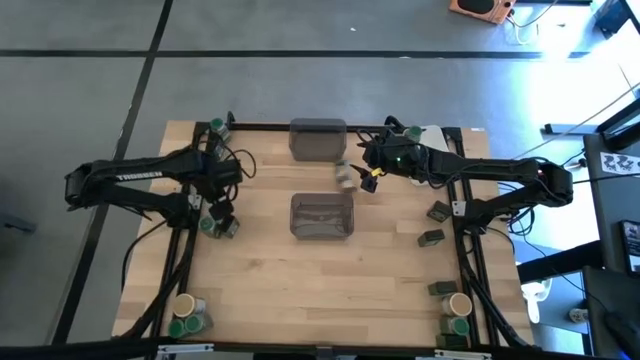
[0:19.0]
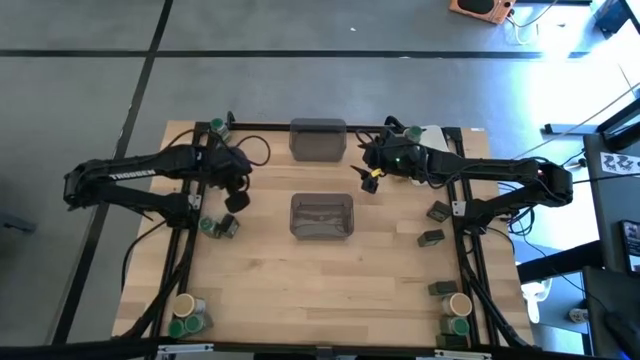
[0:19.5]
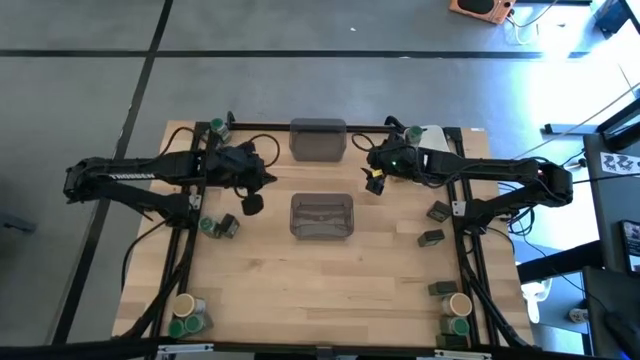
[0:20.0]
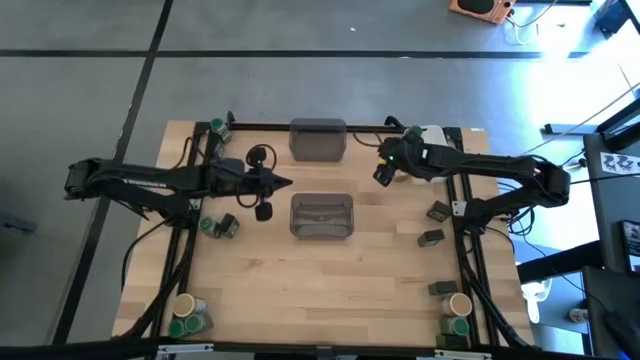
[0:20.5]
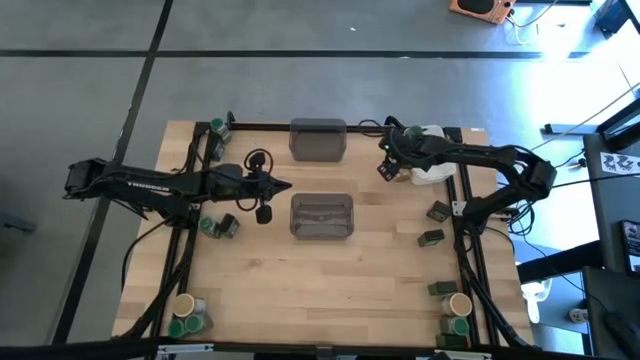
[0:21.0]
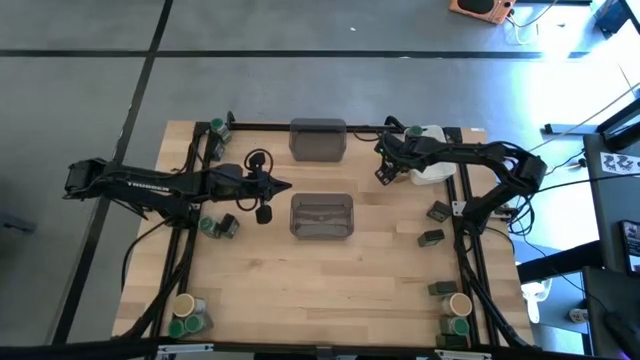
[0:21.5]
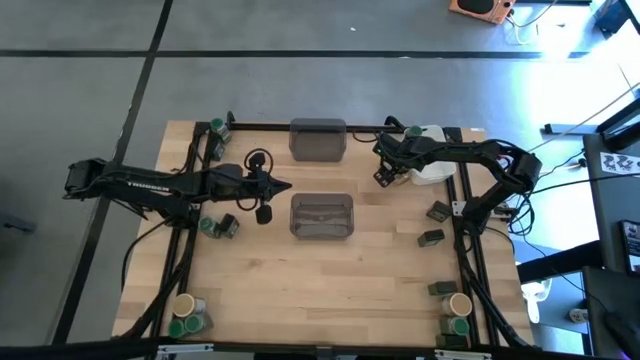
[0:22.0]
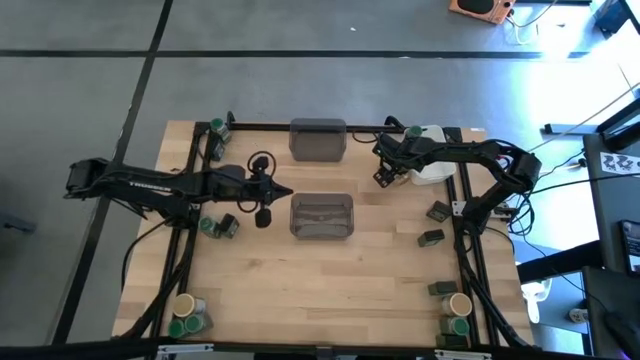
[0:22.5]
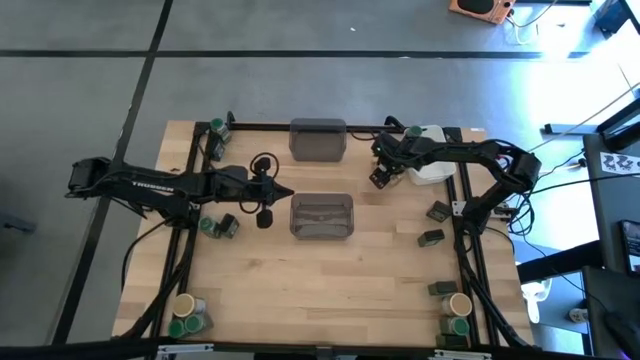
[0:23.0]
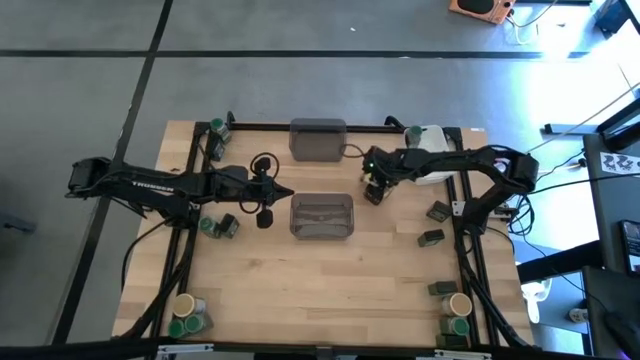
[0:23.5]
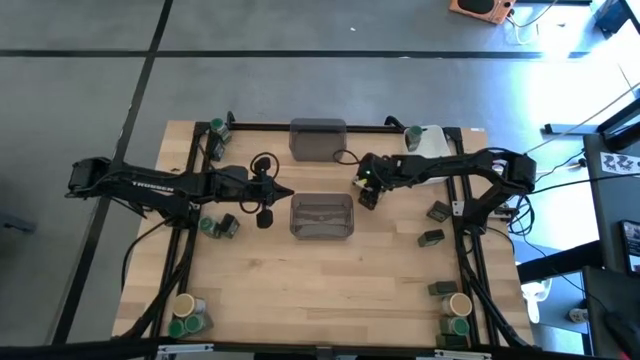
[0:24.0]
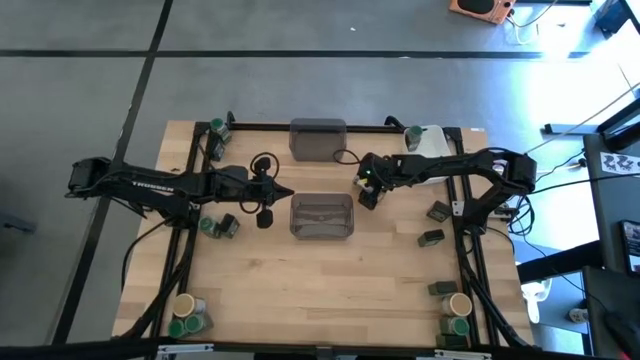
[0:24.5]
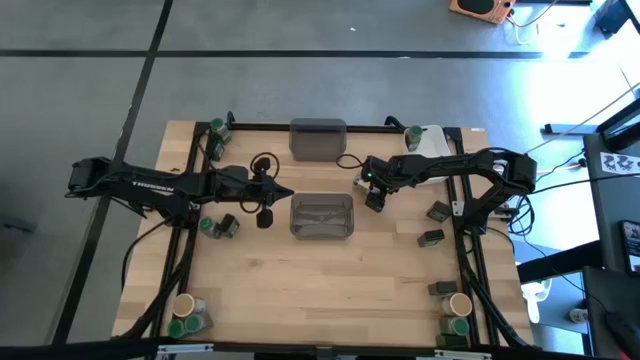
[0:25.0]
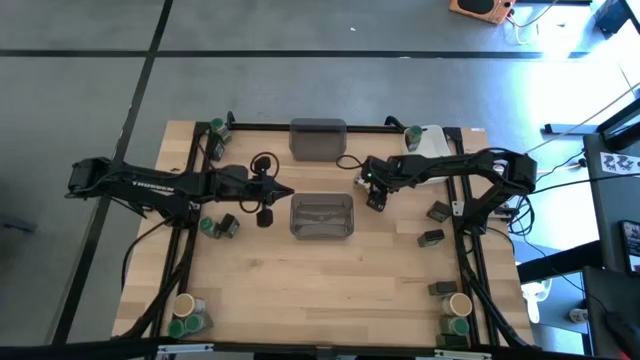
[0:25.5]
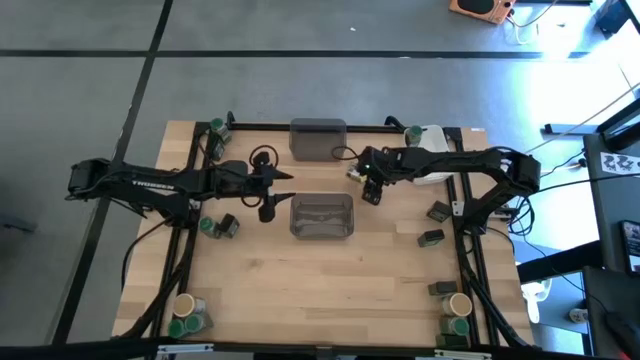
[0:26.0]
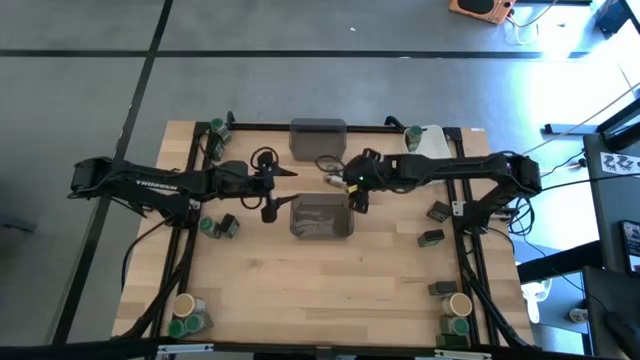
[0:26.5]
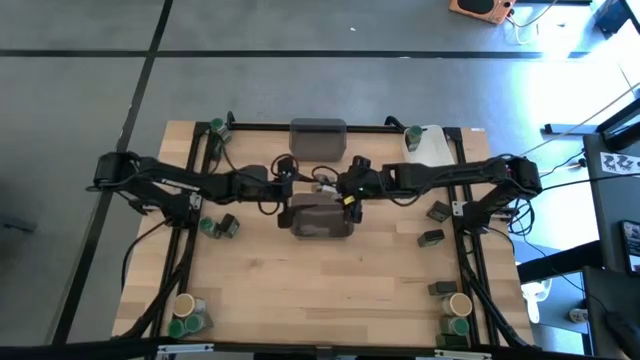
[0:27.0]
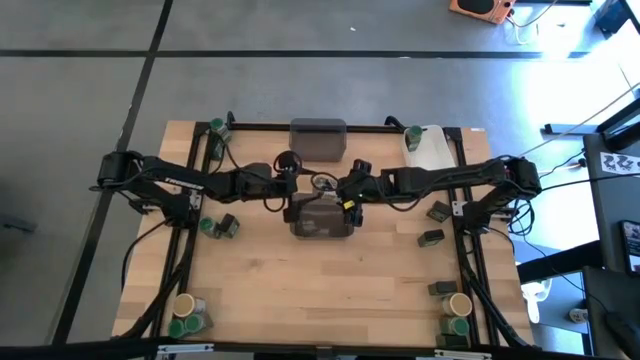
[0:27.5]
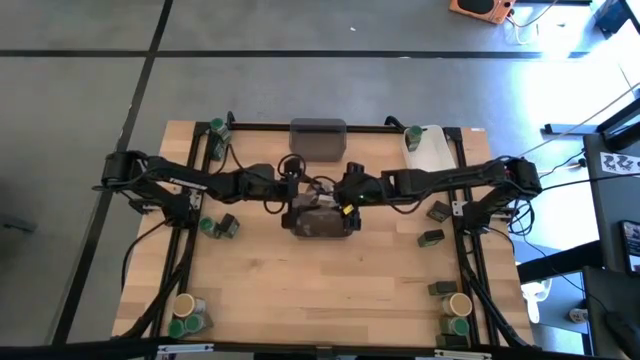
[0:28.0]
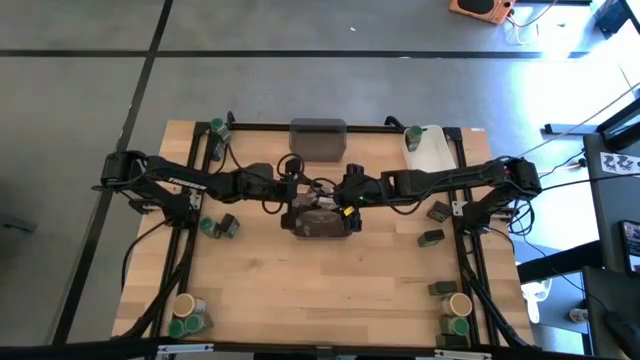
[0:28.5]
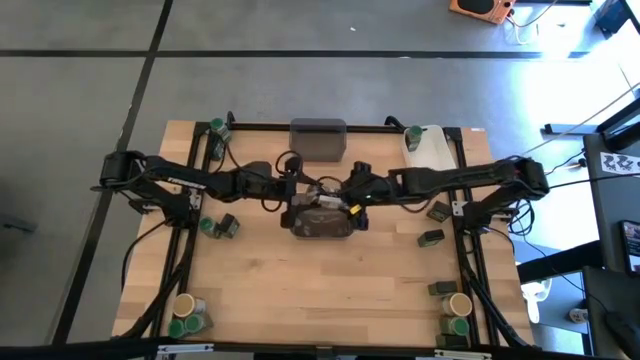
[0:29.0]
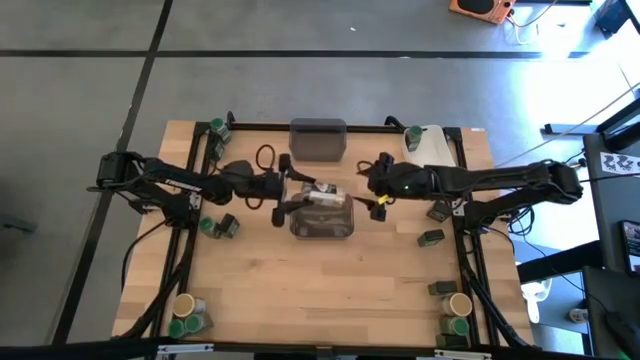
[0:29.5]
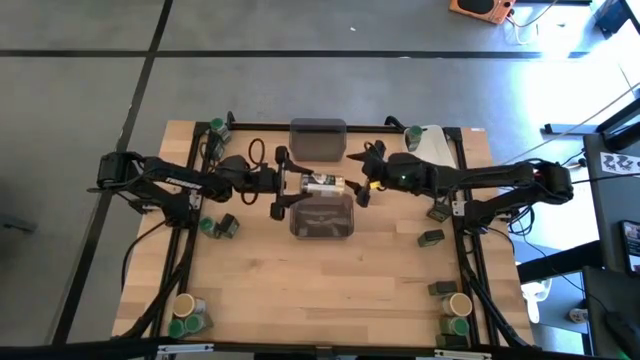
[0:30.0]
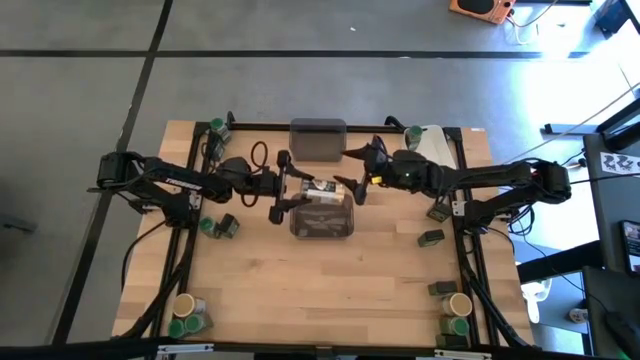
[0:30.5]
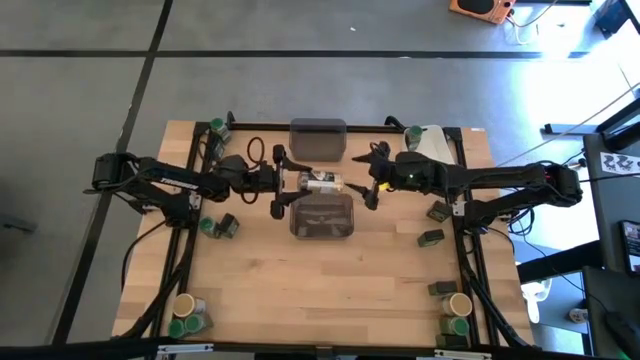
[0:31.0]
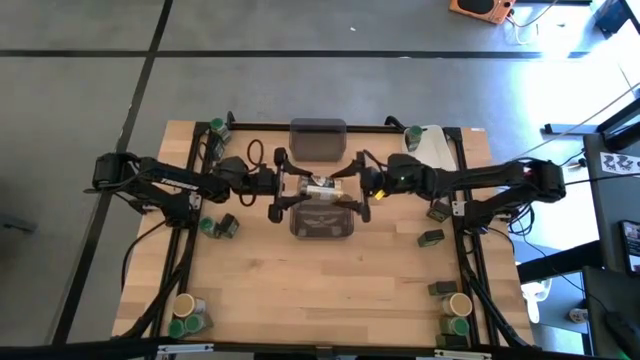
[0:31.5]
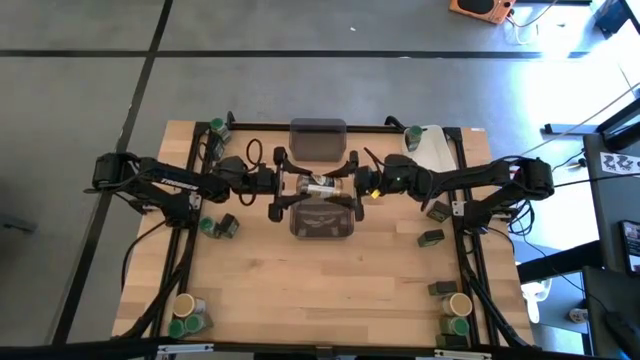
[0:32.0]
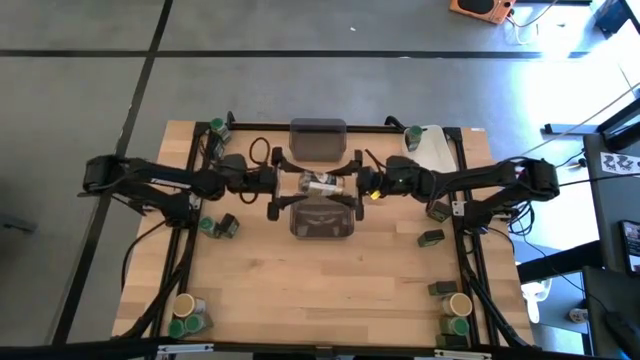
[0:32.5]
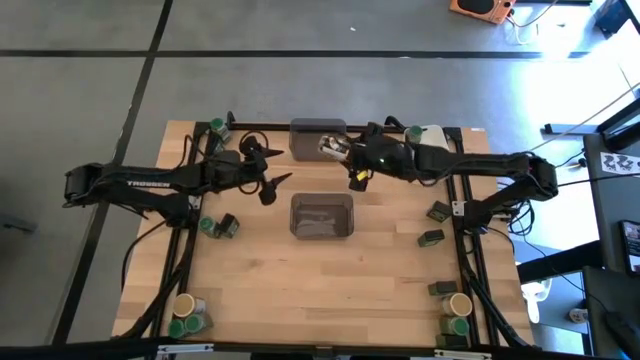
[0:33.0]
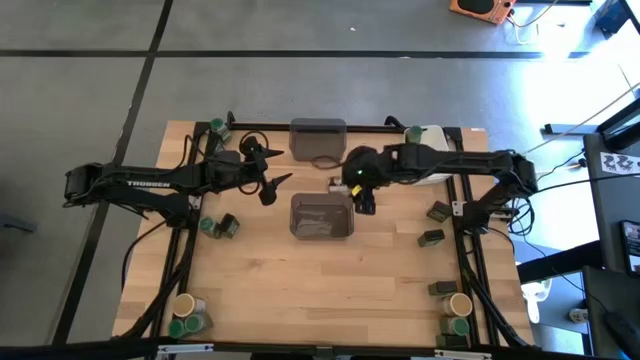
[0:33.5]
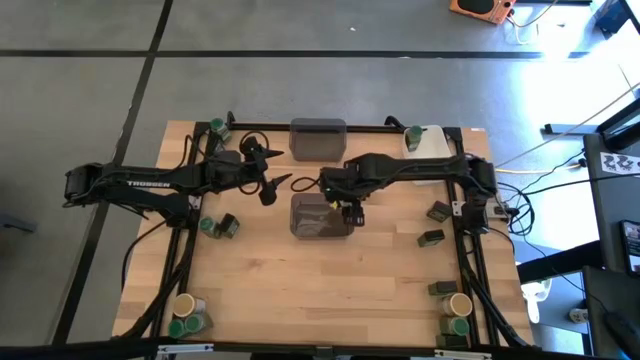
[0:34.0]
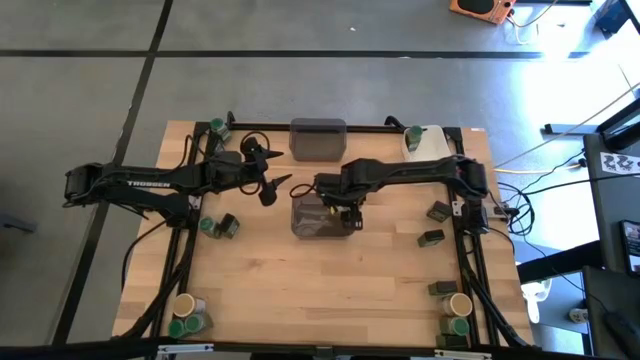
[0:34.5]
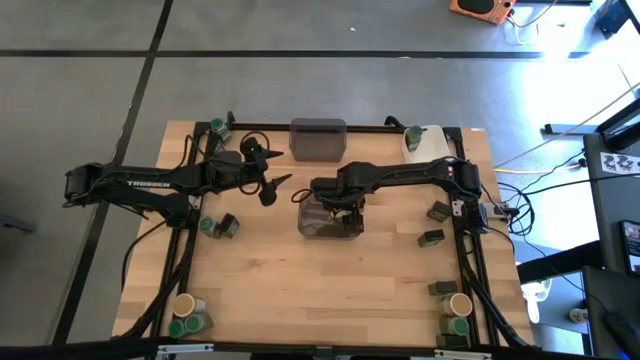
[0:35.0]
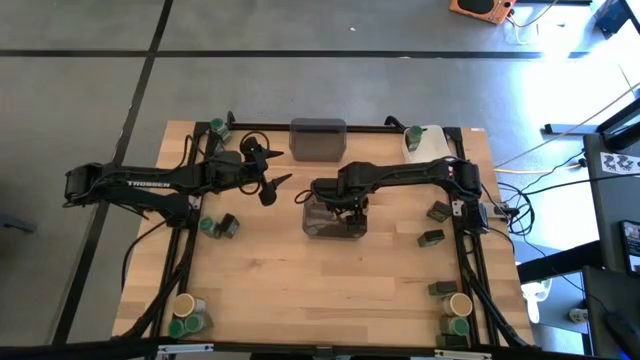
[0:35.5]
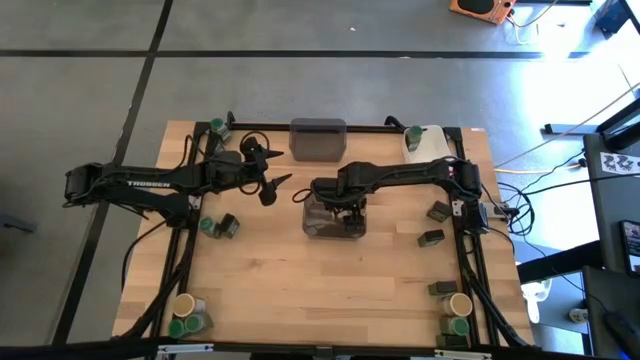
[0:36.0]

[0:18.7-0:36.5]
Task: Sort spices by type
Put the golden seasoning bottle into the bottom black bin

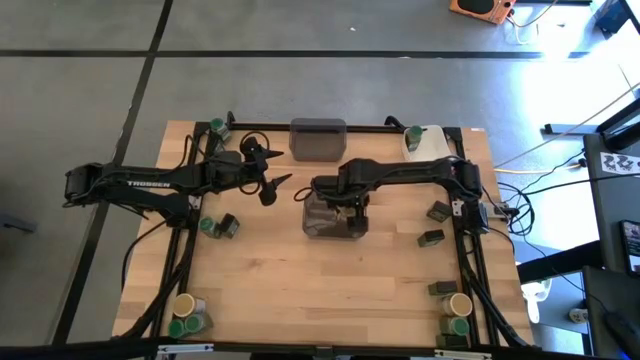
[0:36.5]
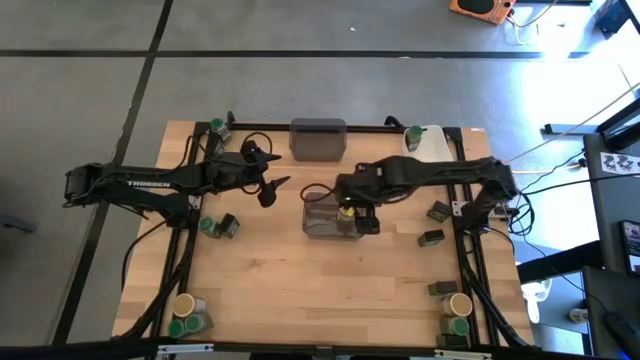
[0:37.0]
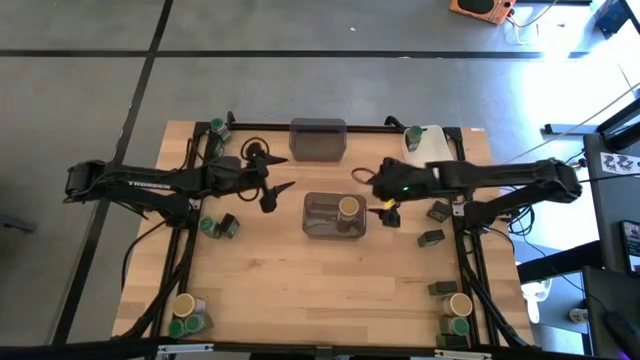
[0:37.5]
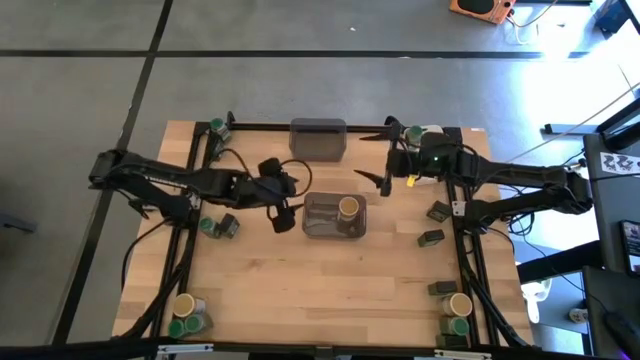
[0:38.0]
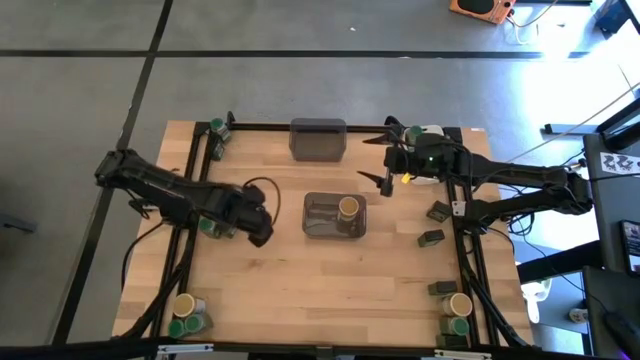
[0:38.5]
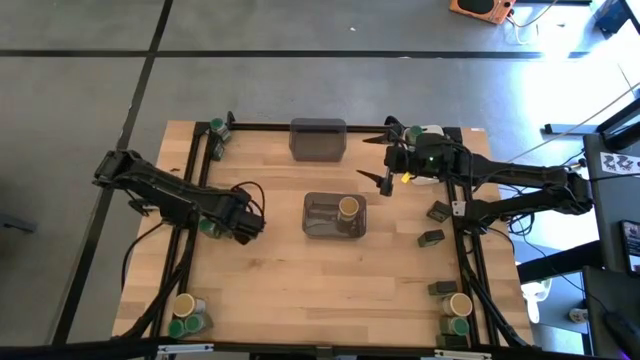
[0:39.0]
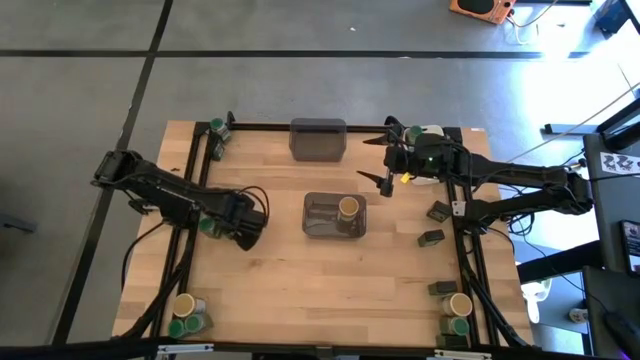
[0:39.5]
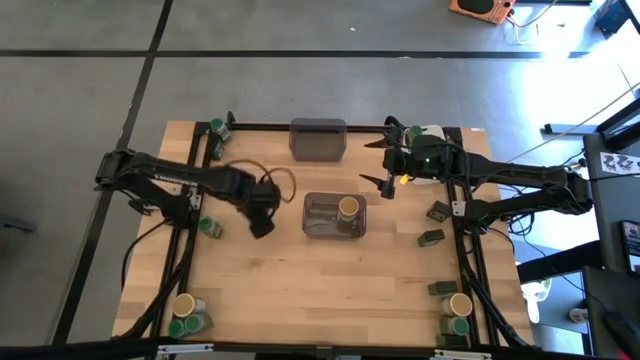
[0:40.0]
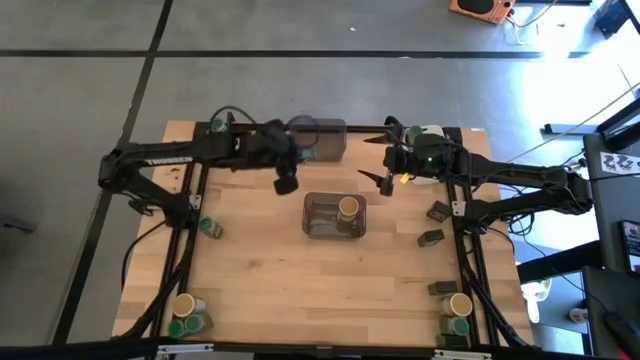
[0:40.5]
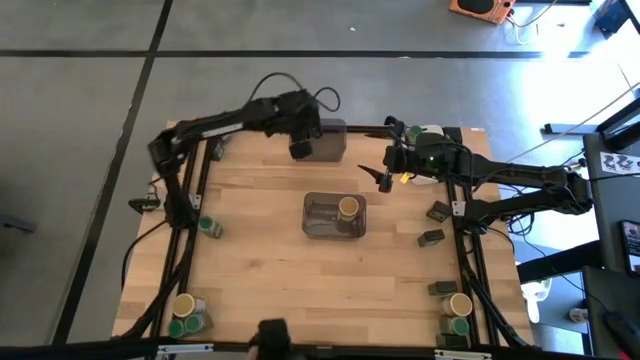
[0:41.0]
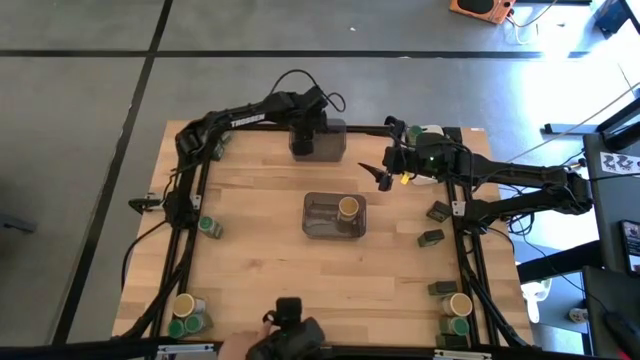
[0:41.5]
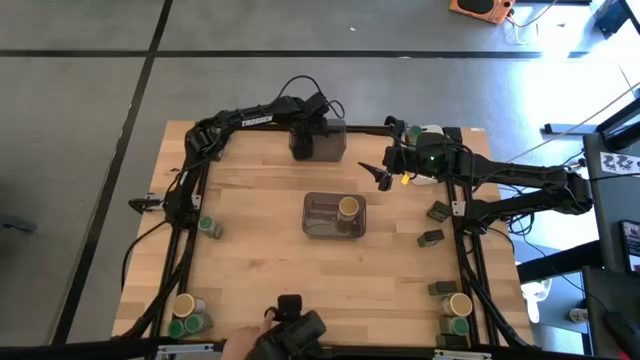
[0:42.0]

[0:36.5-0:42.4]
Put the black seasoning can into the top black bin
